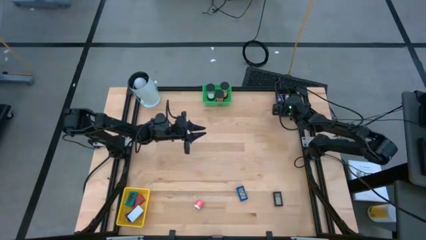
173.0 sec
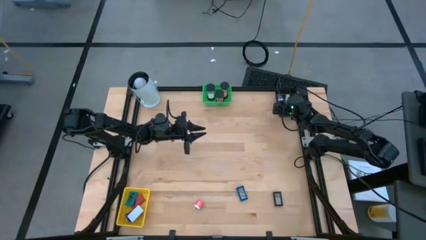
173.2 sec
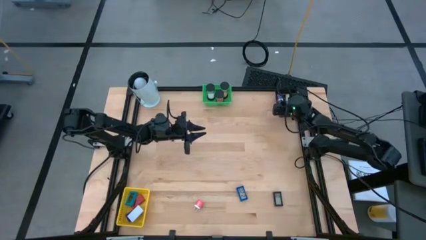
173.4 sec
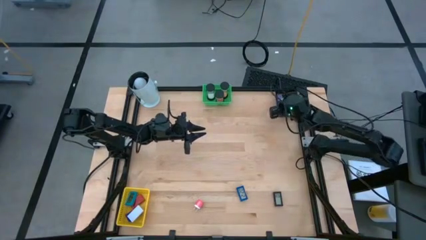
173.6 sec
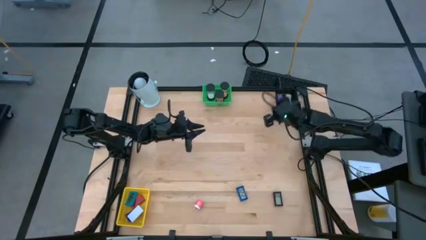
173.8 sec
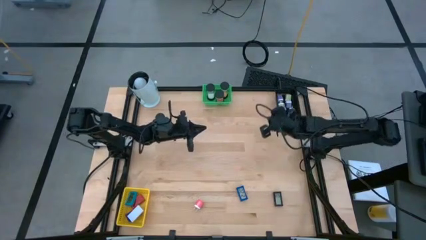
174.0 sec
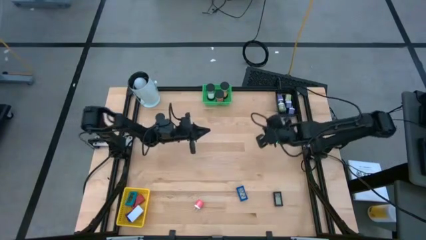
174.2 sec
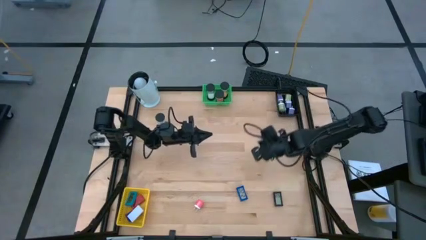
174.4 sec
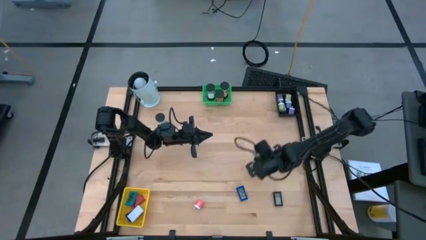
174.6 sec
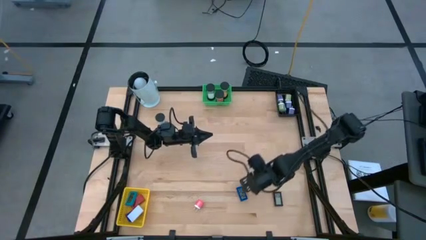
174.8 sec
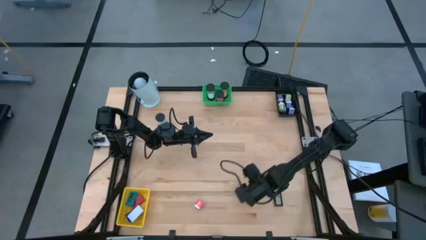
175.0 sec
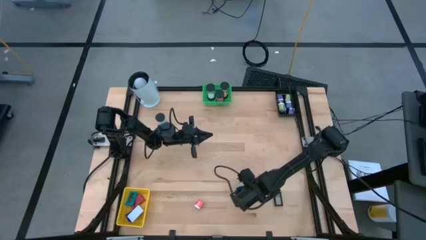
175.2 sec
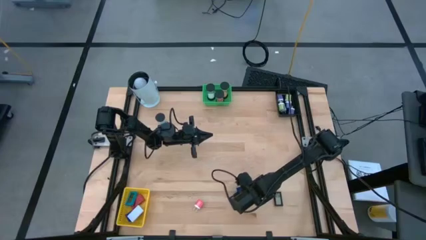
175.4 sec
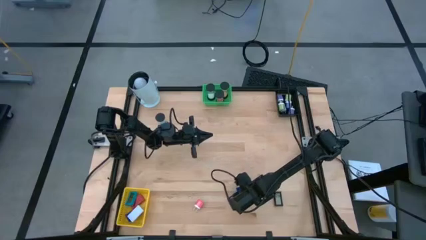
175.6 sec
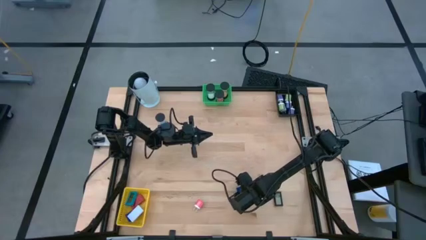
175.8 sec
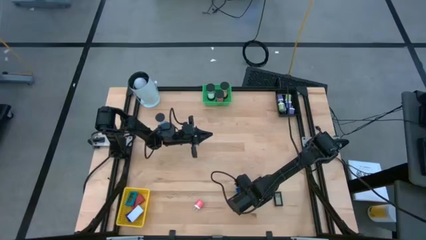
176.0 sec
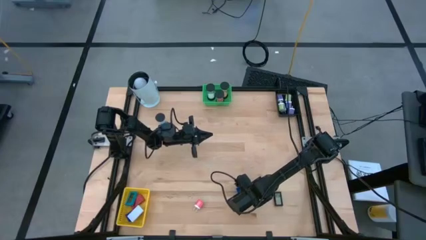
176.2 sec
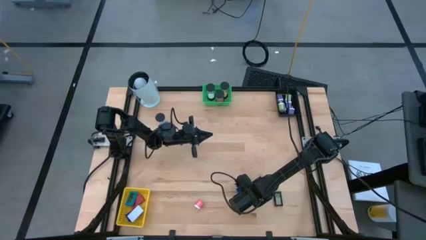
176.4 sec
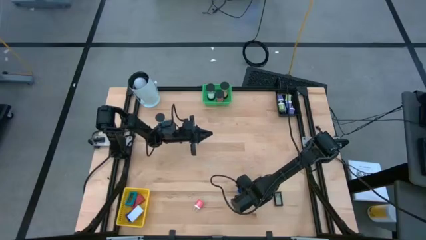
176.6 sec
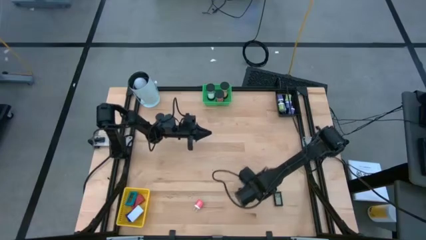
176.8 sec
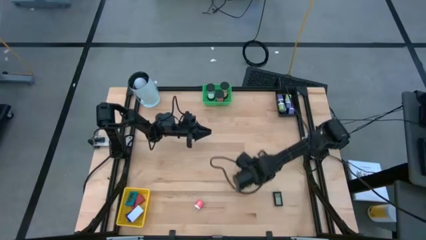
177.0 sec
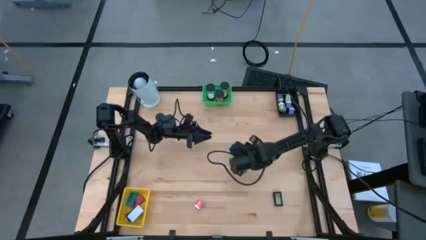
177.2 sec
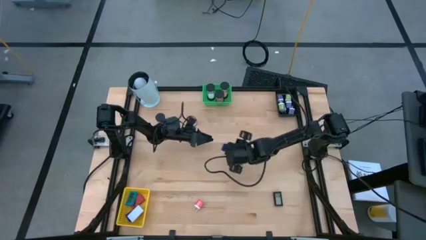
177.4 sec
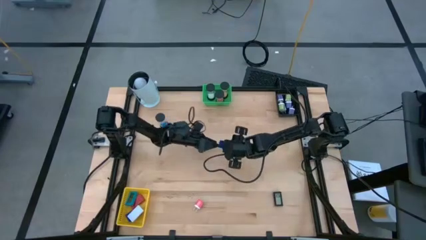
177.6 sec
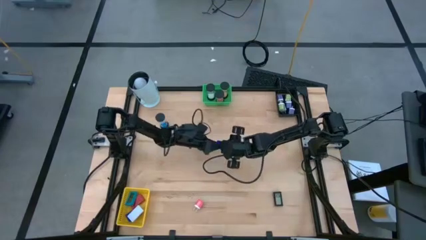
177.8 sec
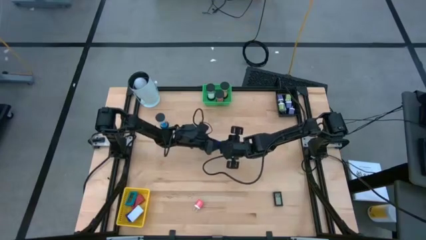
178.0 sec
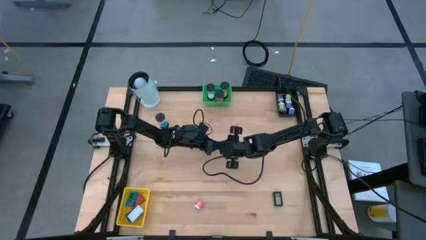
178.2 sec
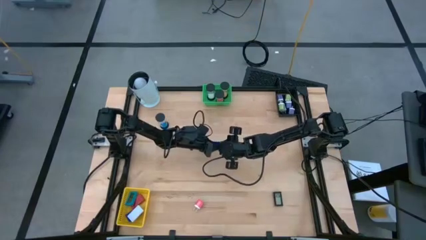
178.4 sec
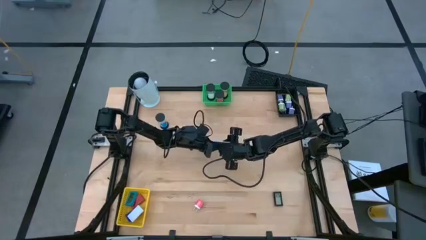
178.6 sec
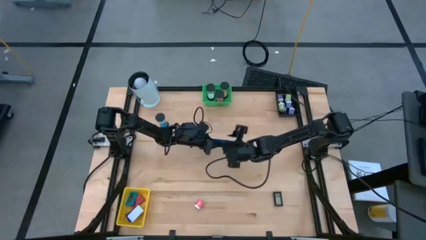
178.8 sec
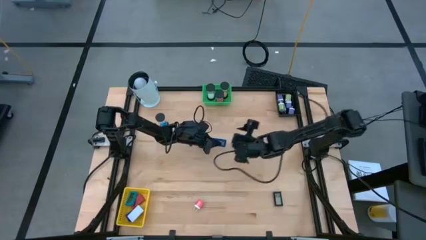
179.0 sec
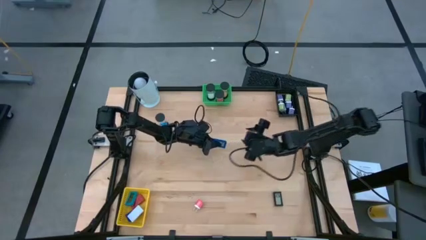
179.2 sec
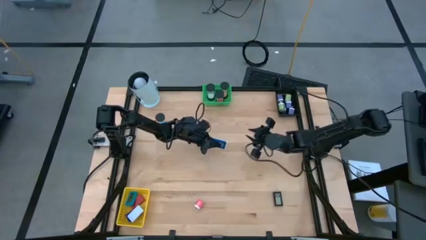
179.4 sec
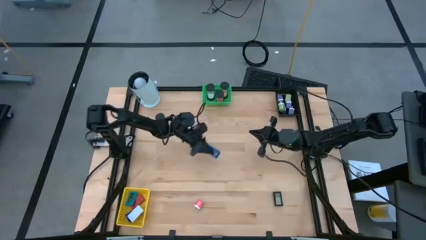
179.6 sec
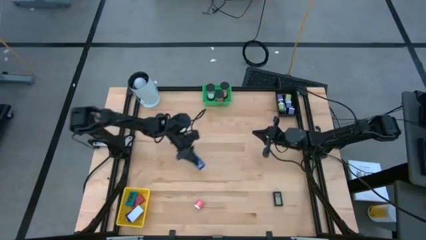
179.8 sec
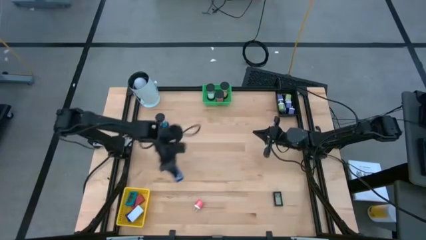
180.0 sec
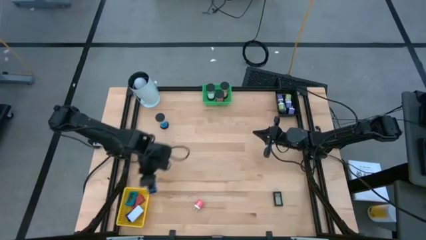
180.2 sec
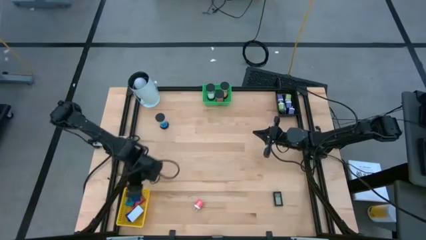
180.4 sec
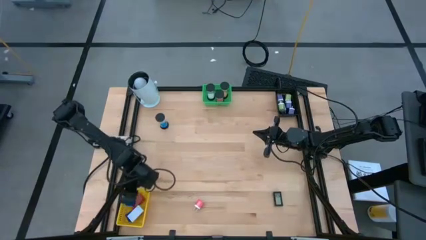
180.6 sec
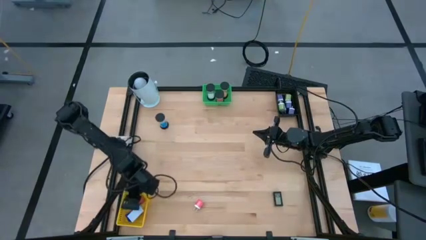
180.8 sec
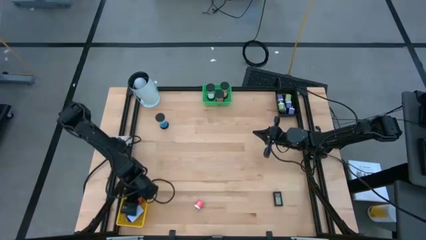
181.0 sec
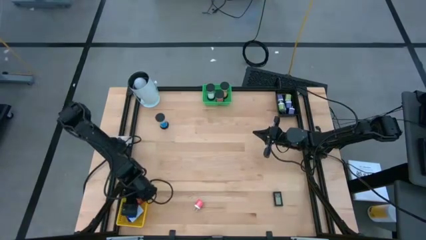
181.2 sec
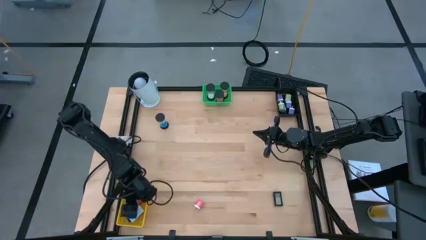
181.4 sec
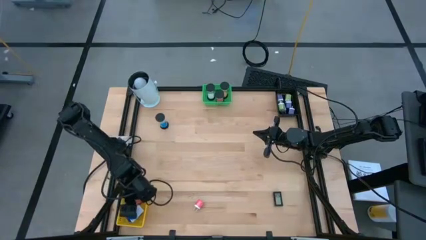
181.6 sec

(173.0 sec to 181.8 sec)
Task: Pick & Place Office items
Put the blue timer into the yellow basket

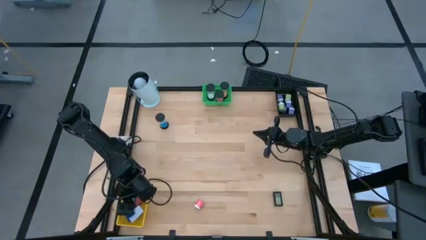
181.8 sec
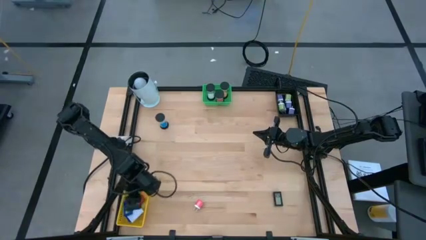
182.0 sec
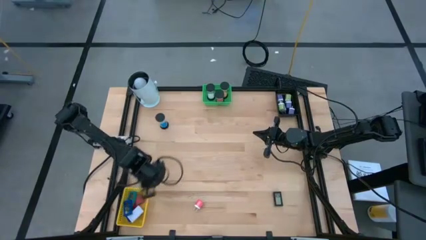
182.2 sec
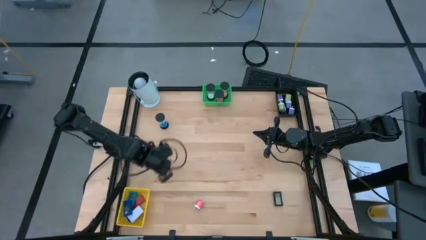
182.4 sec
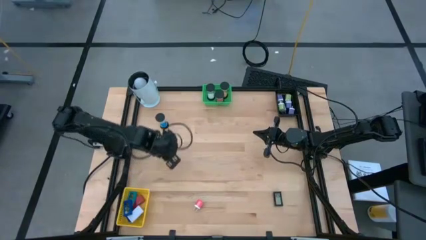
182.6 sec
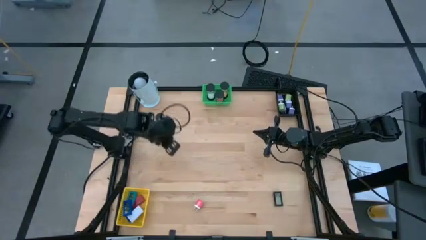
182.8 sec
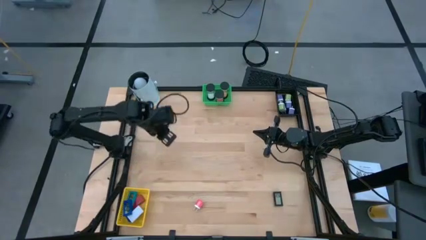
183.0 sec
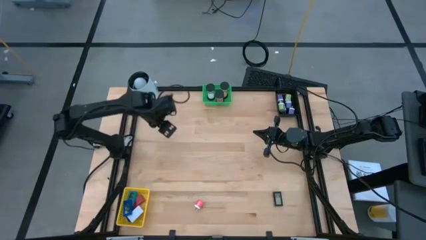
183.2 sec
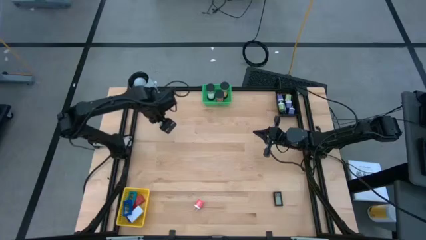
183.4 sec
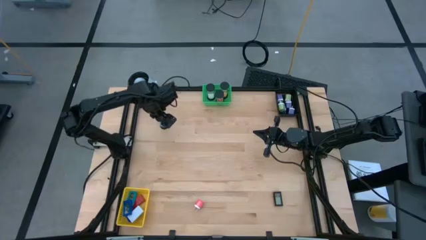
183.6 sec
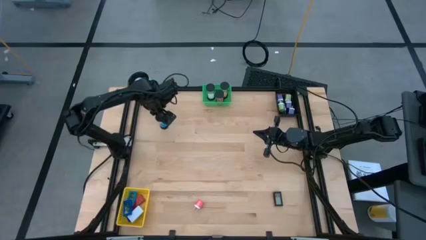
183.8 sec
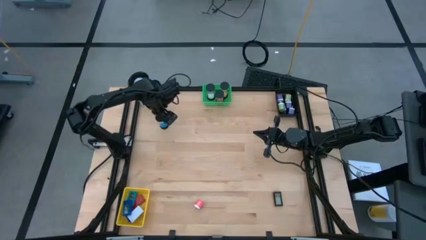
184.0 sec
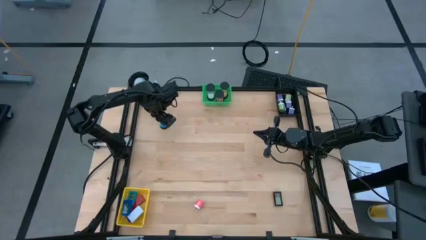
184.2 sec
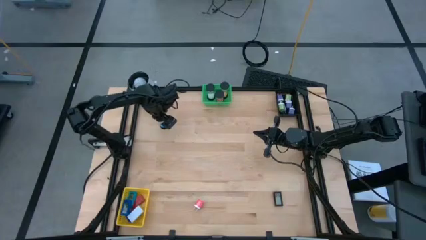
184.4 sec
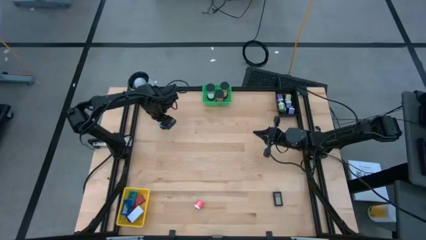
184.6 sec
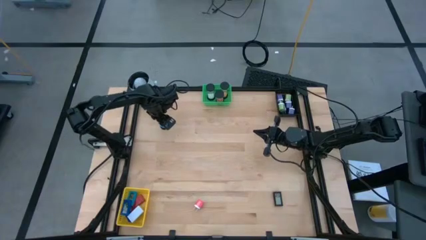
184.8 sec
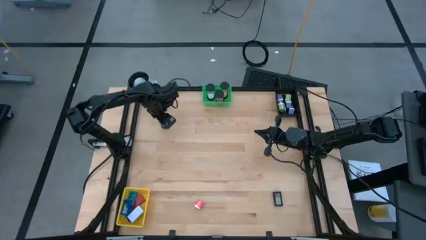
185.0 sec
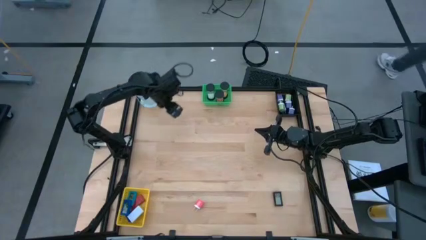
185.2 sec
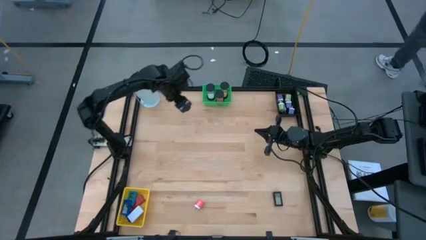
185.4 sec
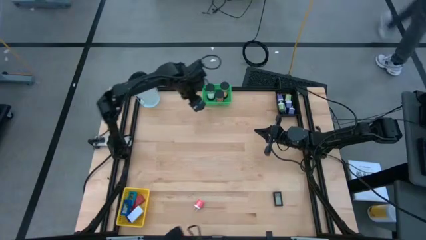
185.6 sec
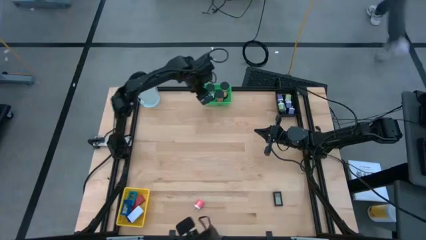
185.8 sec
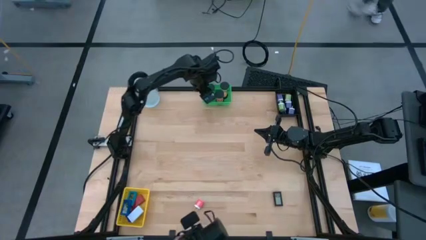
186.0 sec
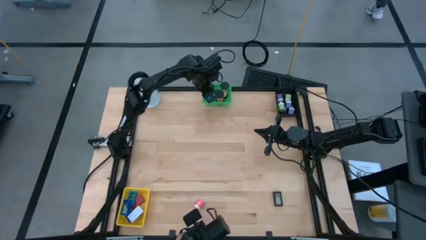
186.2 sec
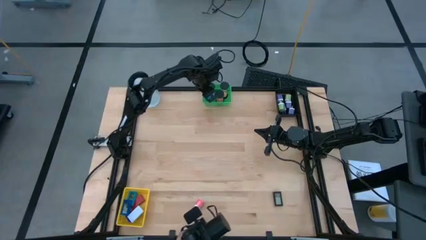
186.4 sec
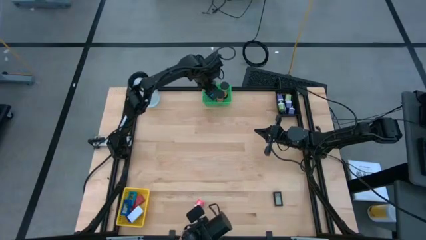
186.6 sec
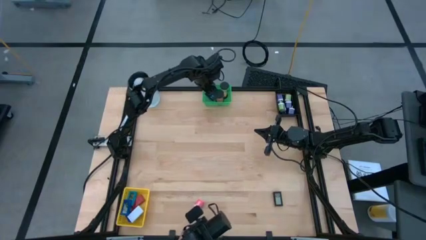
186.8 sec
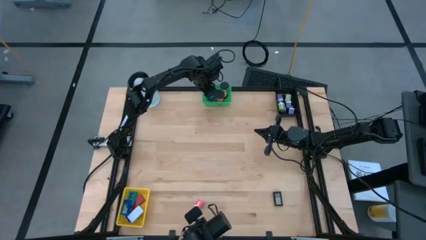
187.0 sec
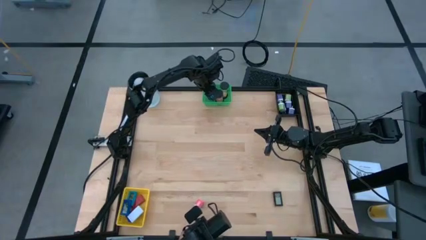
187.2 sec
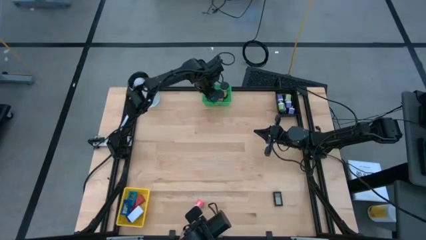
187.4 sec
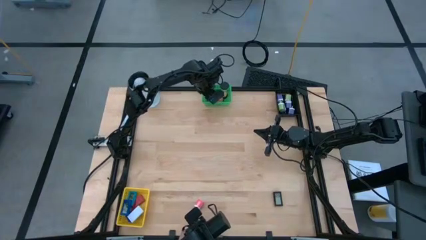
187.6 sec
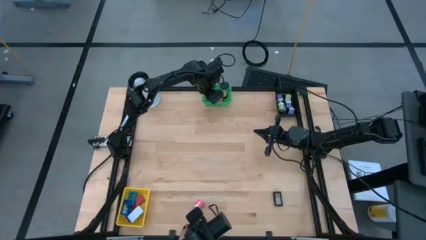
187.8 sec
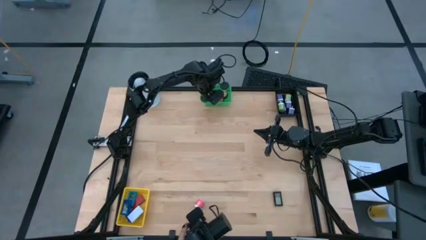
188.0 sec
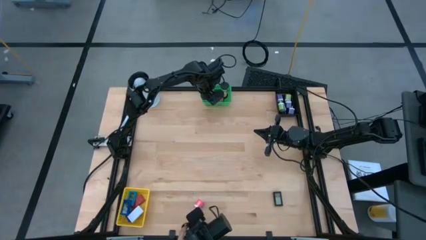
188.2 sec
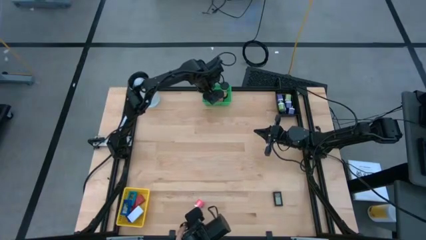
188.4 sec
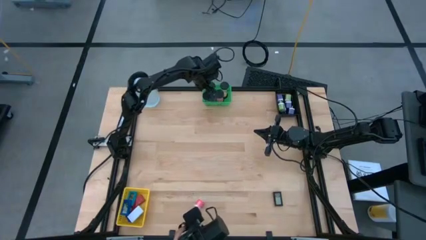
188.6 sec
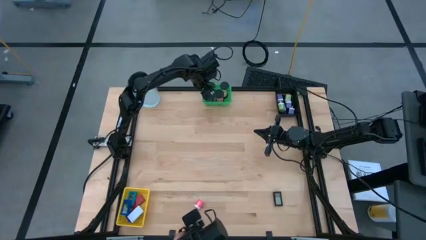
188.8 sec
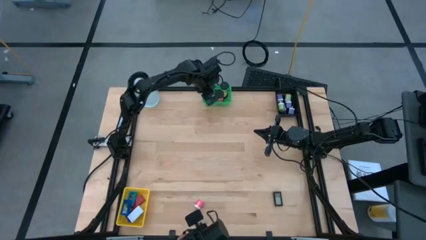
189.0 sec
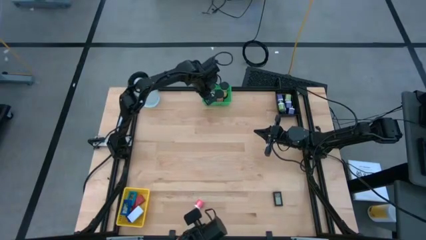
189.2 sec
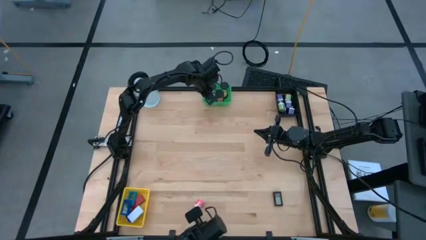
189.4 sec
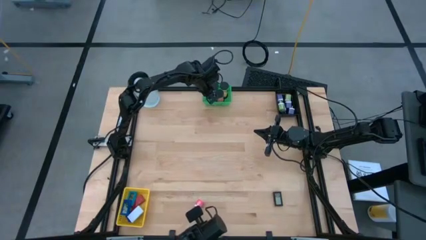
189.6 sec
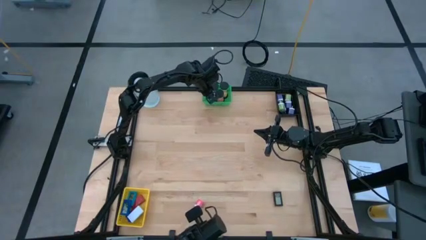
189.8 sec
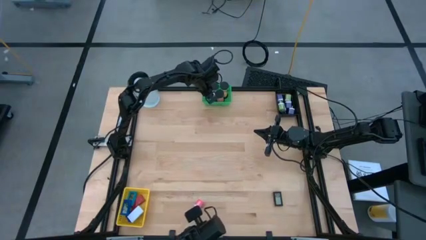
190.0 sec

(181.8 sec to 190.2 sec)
Put the blue hourglass into the green basket
